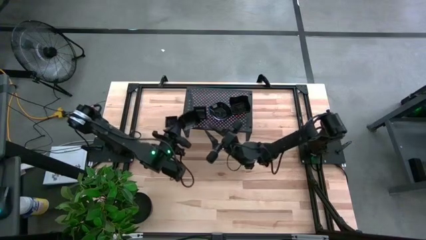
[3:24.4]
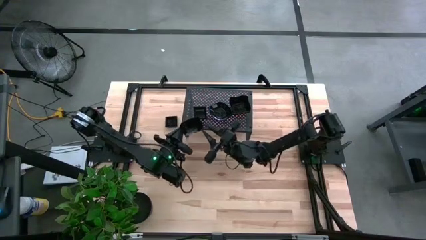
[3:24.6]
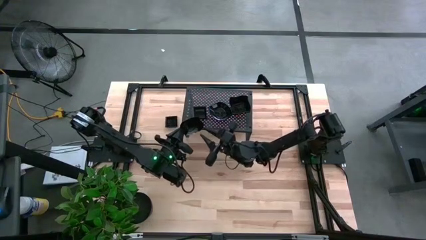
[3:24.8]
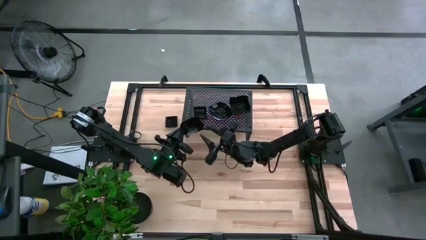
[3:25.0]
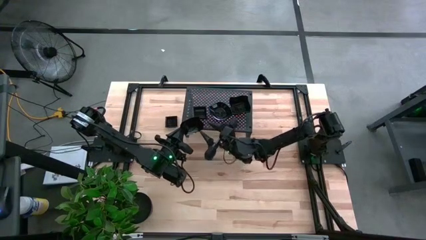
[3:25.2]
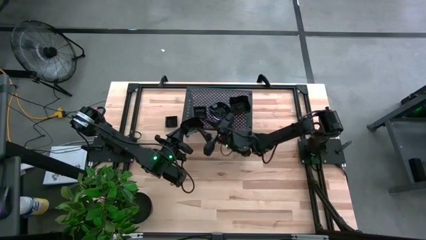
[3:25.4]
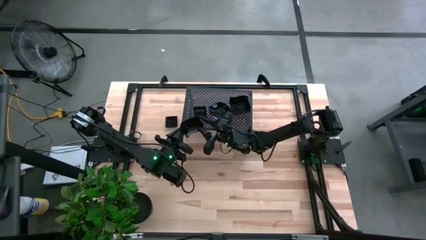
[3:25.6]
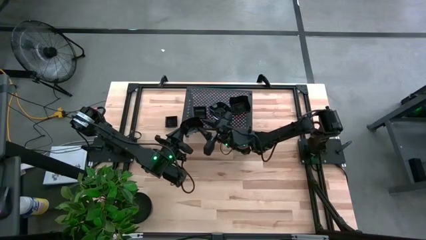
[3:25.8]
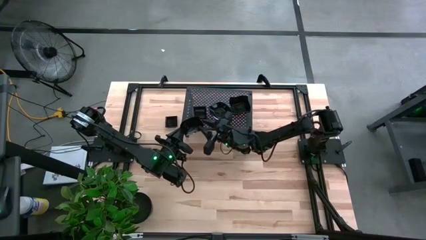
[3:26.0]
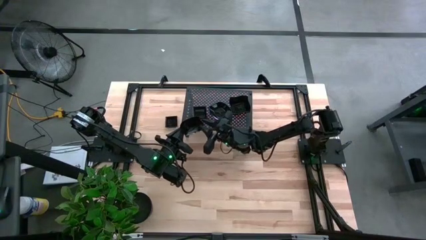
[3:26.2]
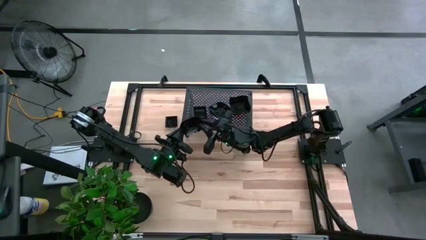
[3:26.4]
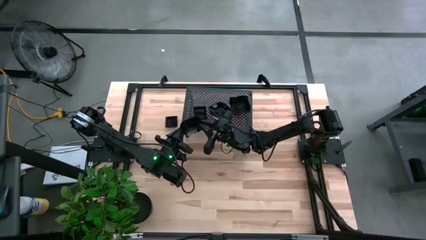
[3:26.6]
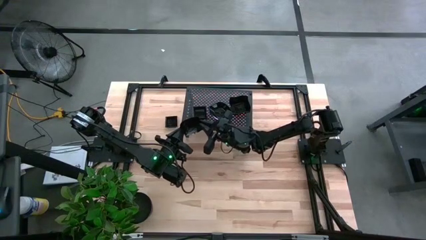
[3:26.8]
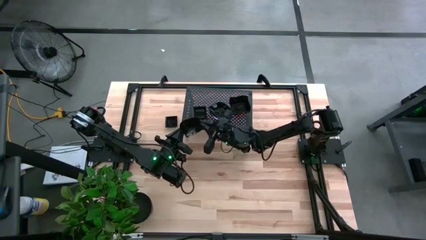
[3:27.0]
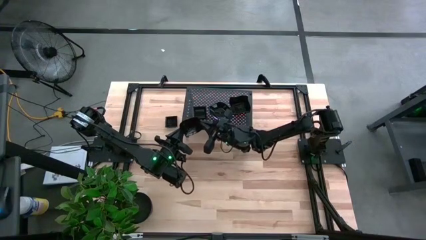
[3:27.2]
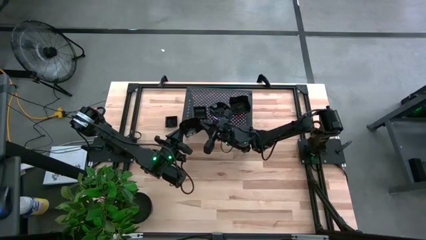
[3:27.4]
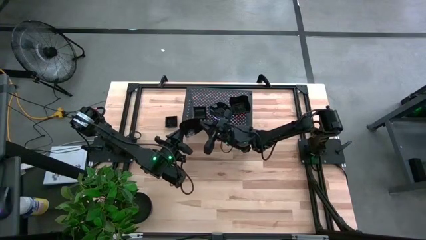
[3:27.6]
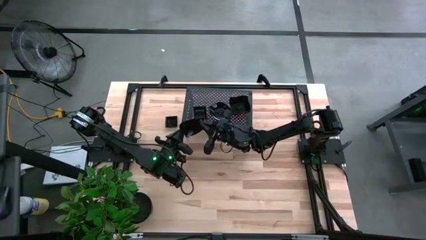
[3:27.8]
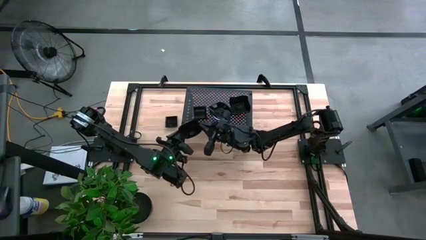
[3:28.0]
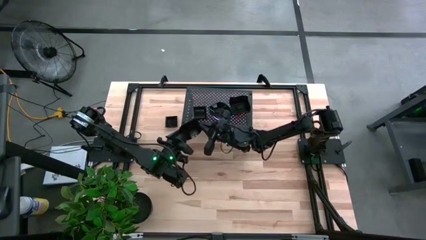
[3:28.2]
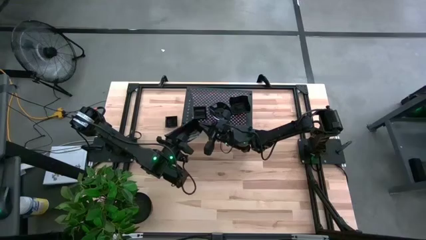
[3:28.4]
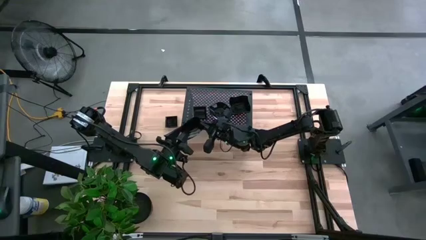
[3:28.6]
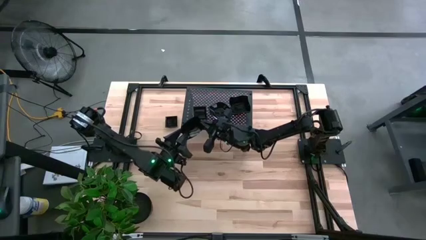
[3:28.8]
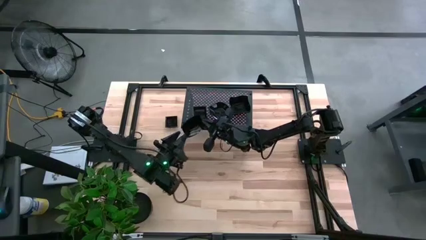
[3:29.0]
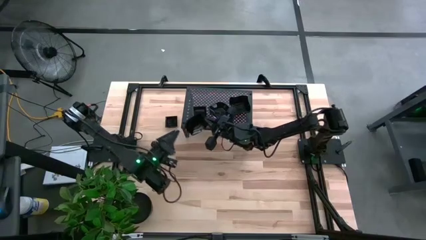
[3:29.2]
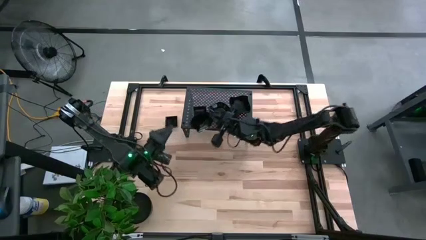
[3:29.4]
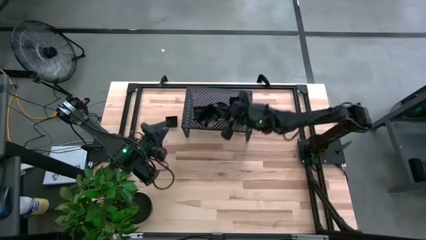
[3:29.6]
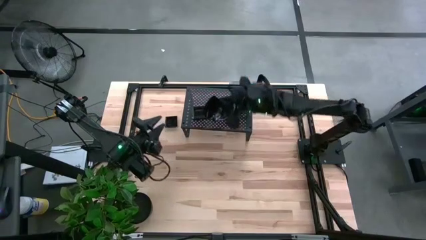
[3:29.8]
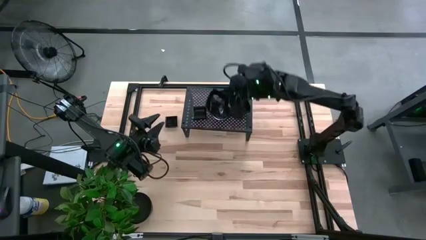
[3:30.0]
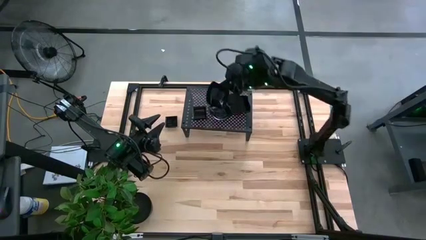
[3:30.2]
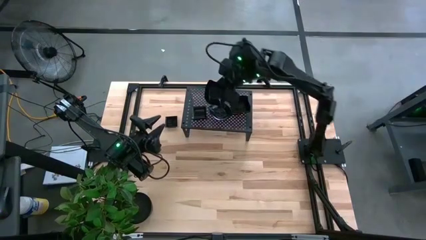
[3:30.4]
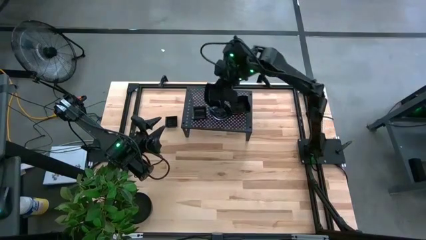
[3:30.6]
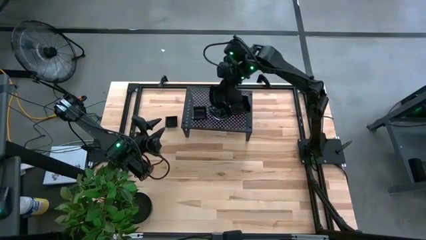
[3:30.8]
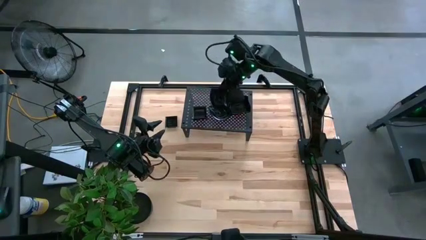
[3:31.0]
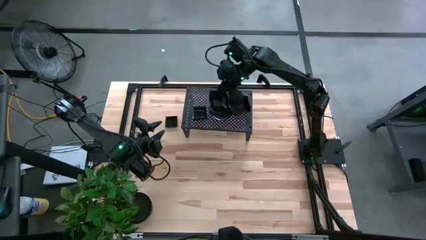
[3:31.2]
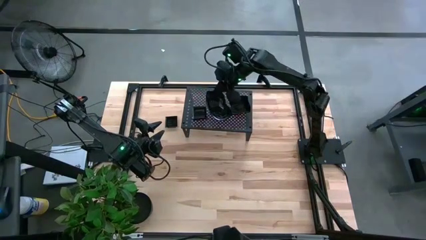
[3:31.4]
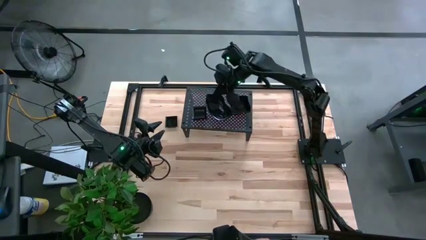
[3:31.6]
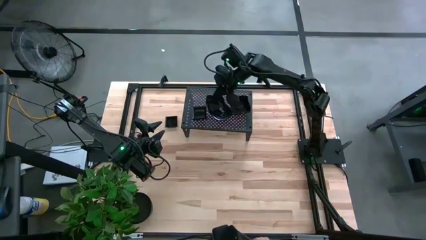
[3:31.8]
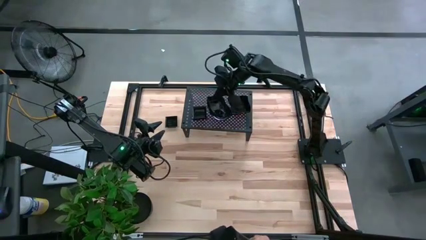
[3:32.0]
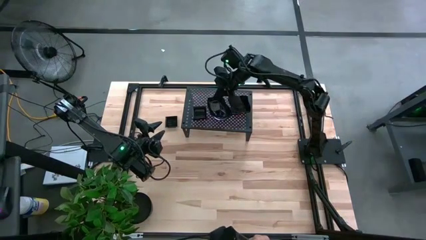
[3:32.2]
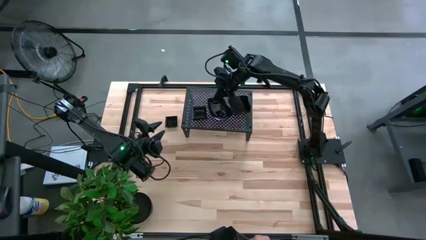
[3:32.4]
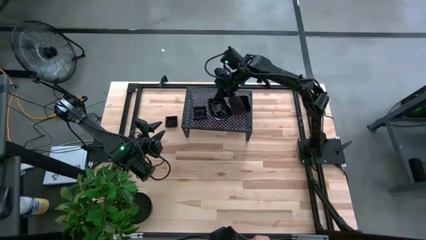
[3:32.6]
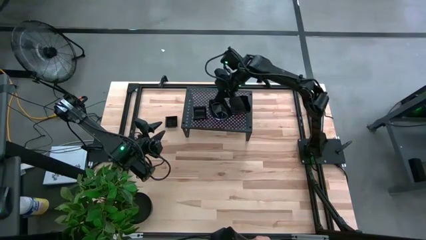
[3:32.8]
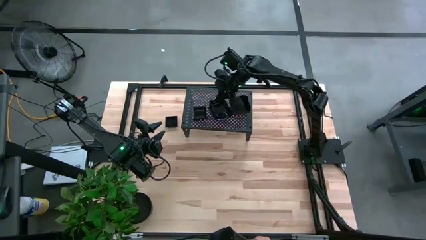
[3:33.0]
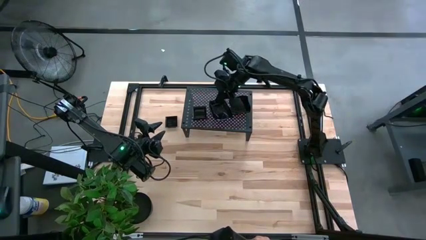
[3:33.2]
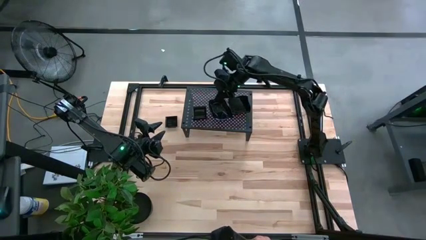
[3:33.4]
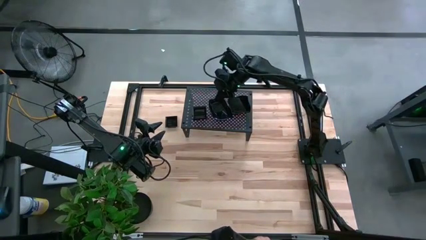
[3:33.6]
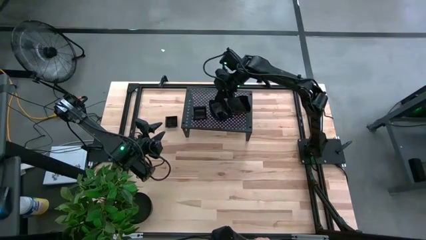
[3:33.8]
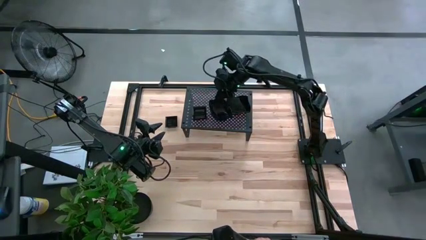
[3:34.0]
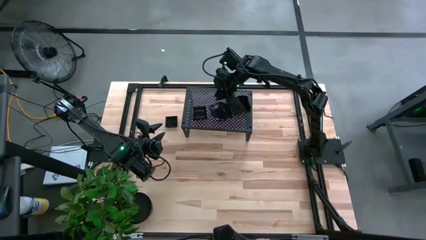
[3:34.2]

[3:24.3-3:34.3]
Task: Pick & Place Mini shaped plates
Stack the leaf-shaped plate on the leaf-shaped plates on the shelf

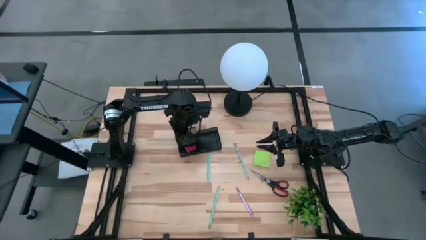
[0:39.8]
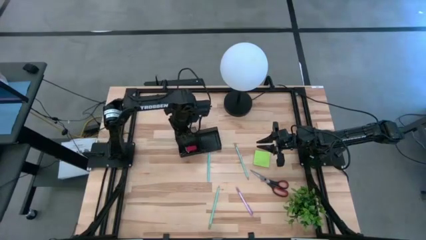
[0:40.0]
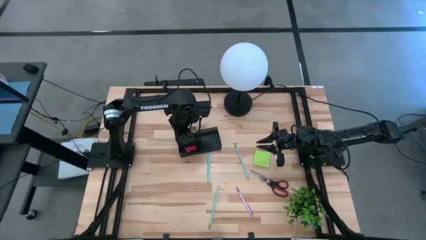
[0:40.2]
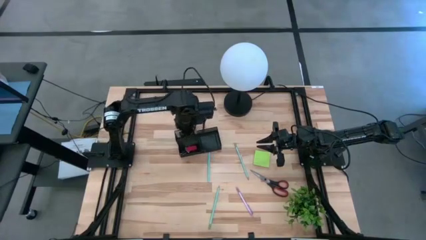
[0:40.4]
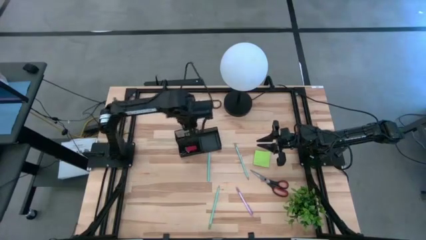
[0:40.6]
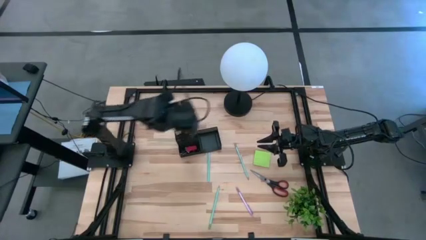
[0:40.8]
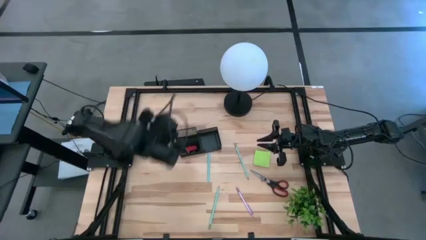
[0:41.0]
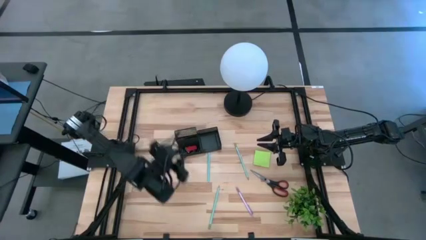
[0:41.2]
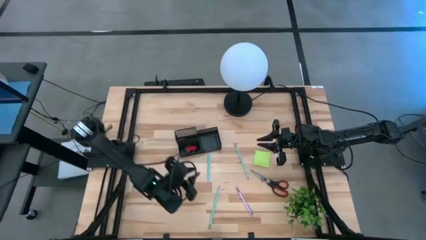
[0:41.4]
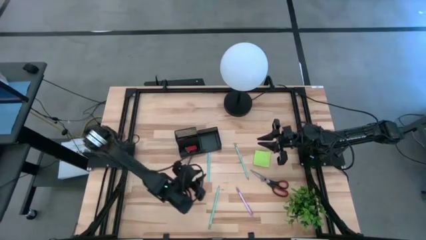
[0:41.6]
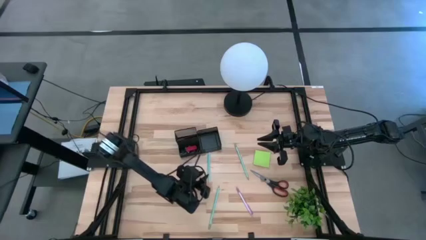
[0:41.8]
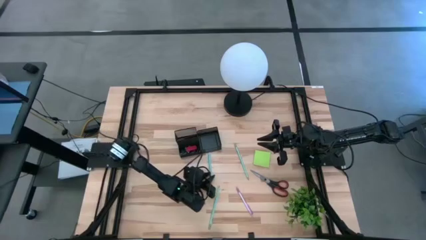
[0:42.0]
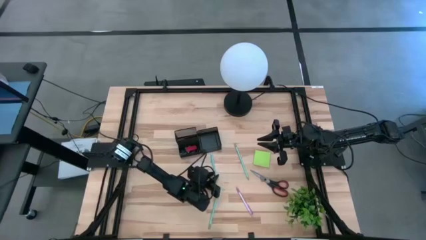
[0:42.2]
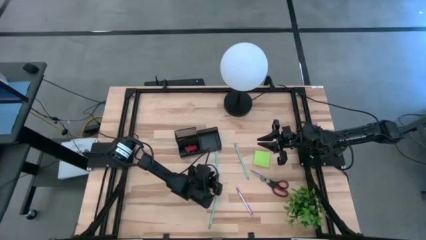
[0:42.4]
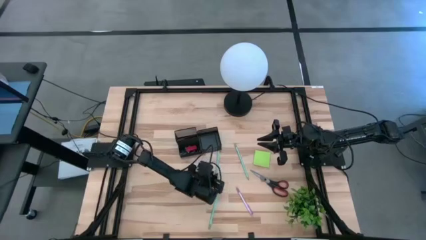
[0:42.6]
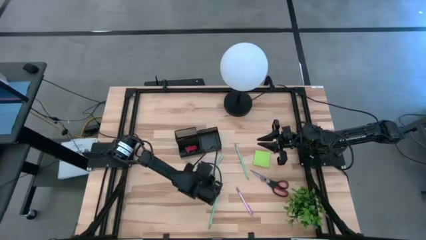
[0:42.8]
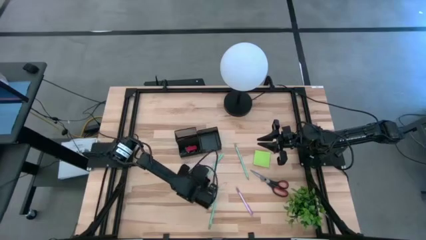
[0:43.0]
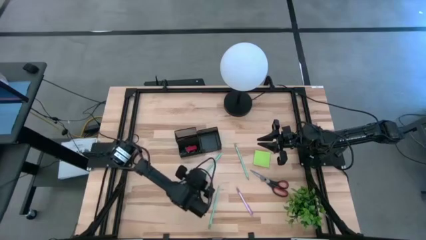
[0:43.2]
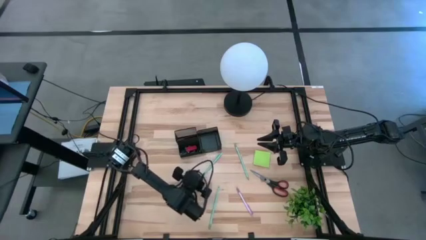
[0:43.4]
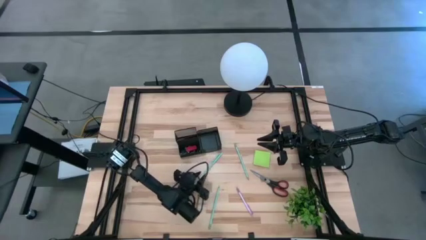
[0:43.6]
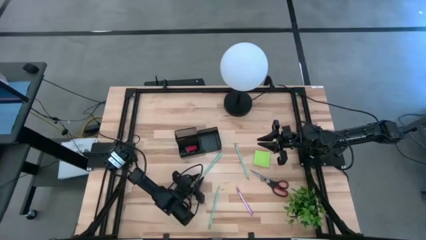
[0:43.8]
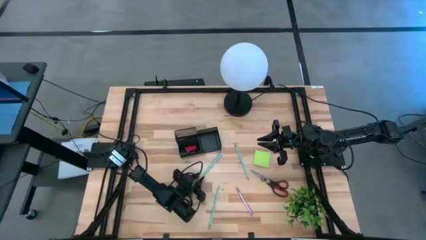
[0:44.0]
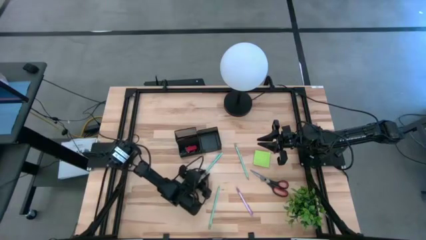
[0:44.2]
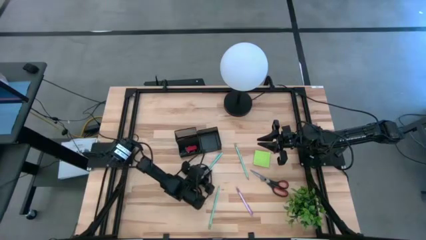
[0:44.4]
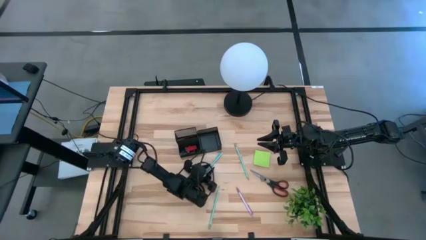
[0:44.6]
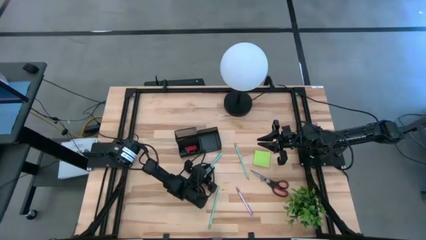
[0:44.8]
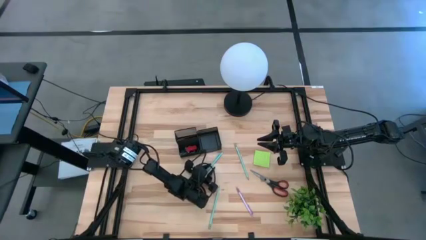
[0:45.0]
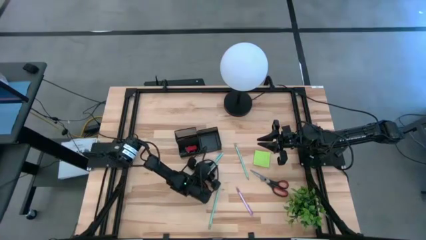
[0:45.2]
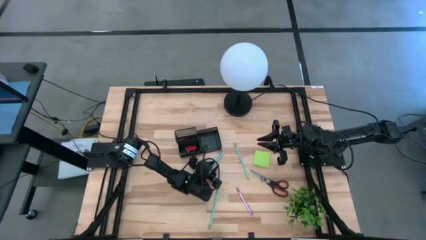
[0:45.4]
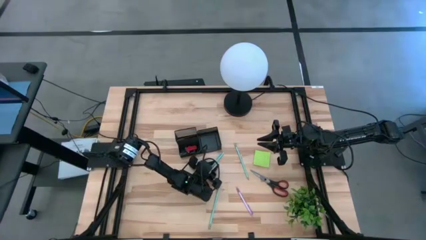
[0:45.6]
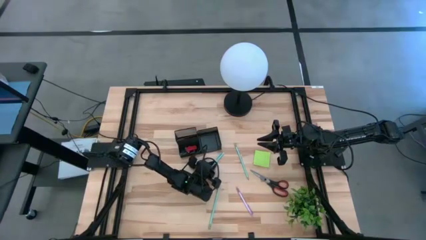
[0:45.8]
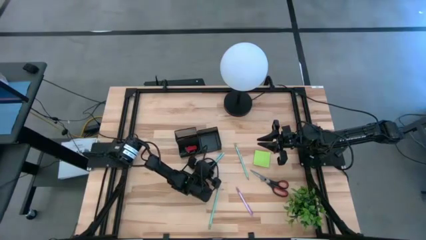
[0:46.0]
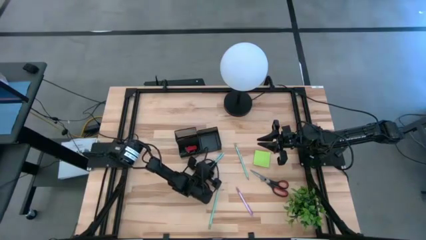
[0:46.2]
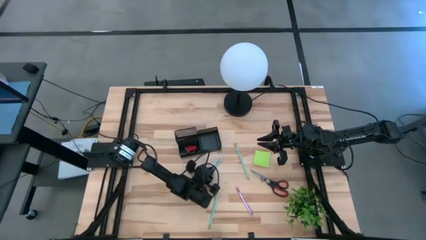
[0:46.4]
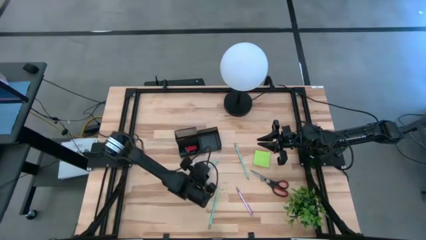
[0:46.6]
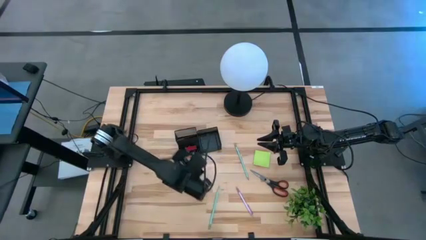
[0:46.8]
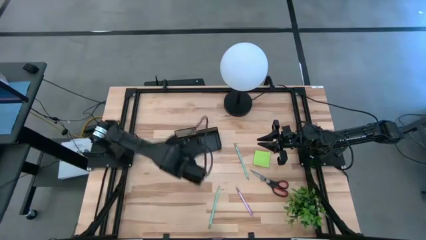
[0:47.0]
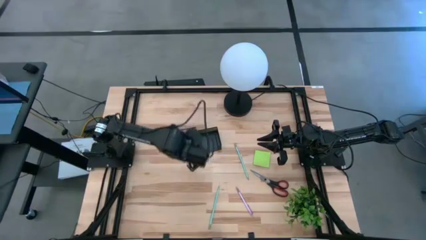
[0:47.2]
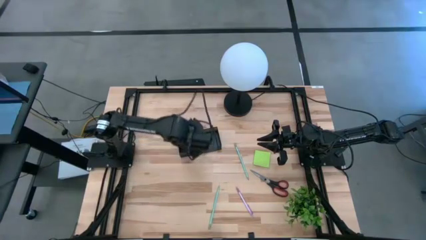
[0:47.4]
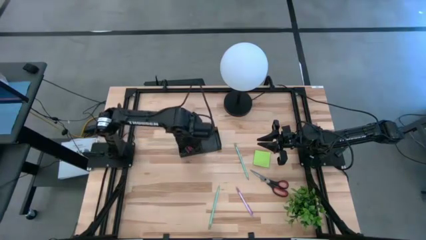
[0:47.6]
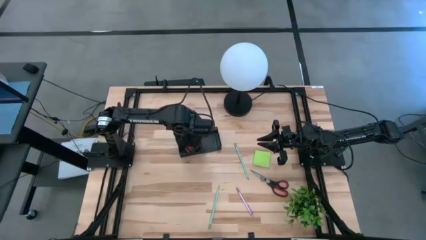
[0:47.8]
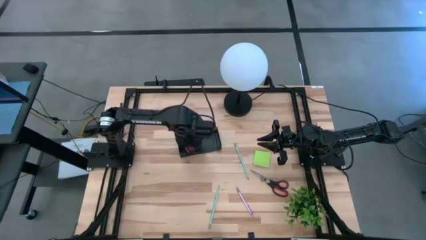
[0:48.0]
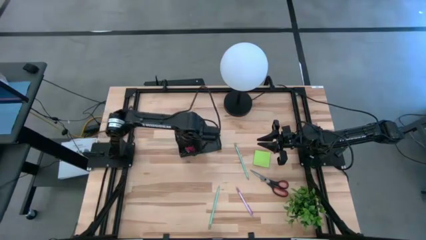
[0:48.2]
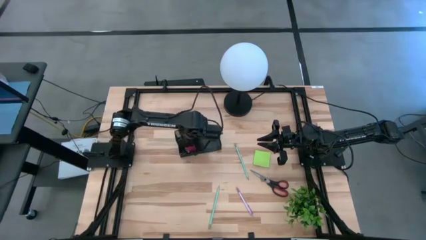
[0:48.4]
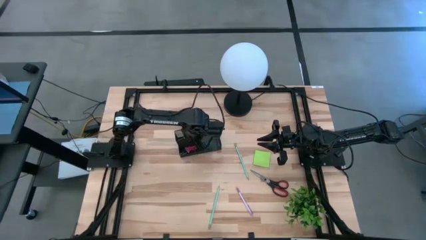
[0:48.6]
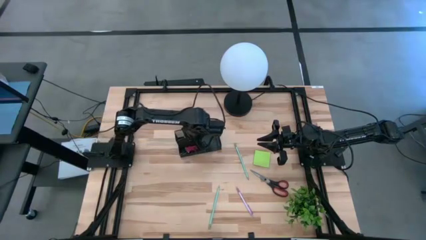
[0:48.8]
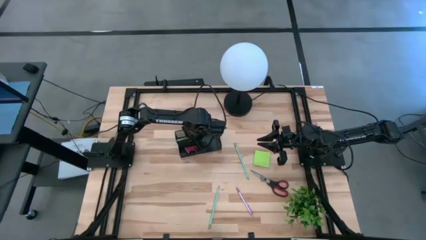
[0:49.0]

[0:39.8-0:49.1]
Task: Pick and place office supplies into organizer
Put the blue pen into the black desk organizer
